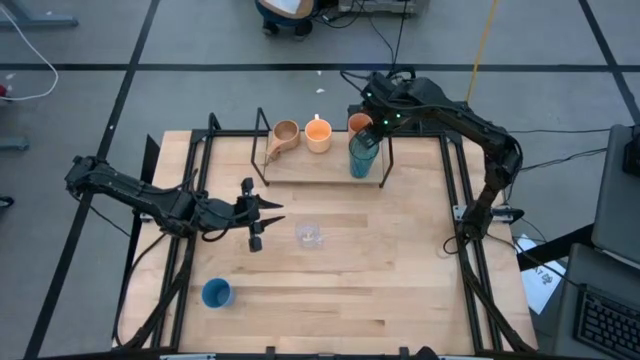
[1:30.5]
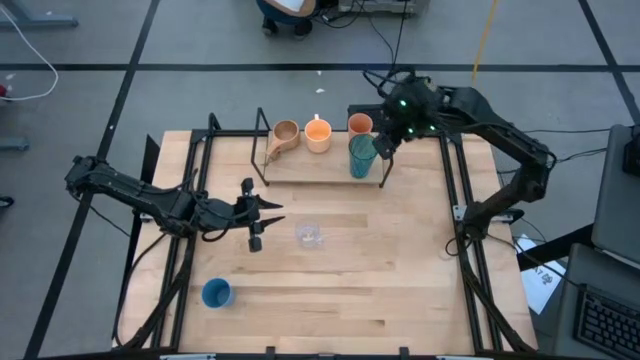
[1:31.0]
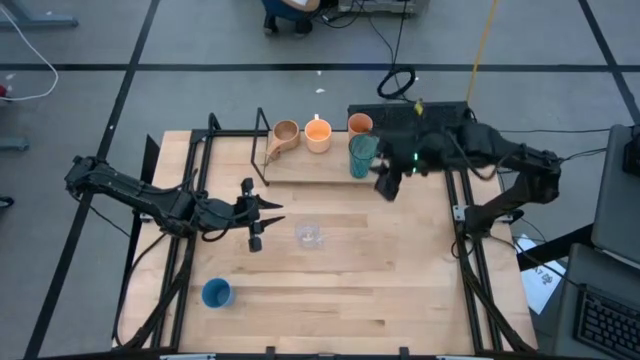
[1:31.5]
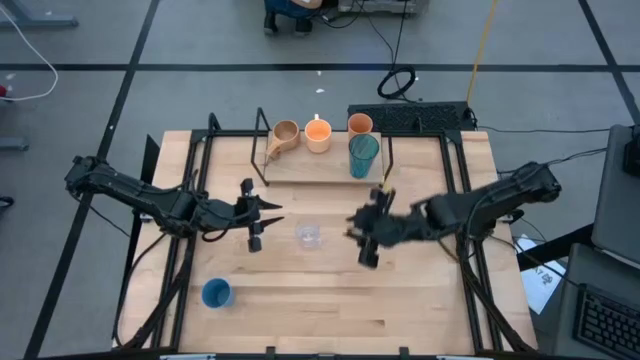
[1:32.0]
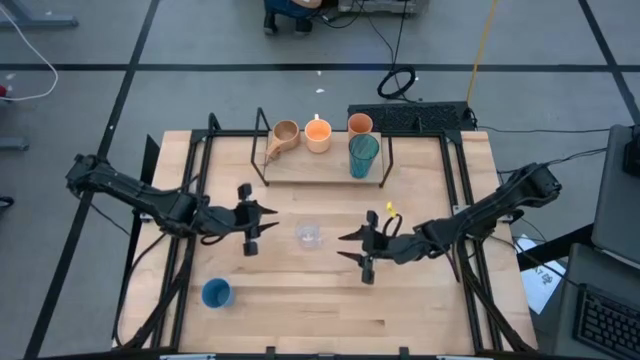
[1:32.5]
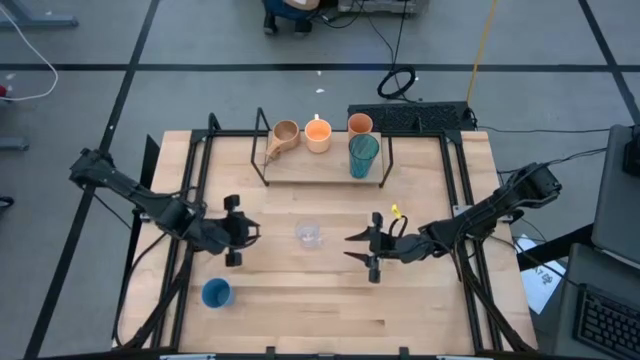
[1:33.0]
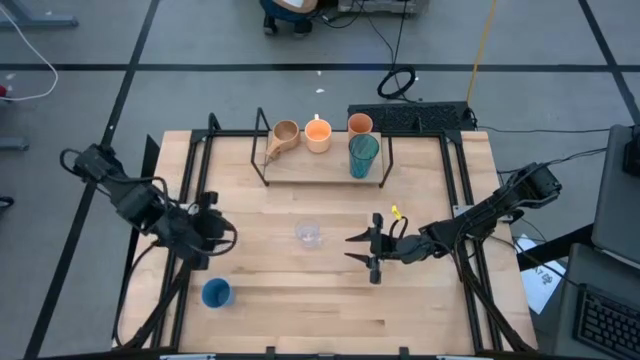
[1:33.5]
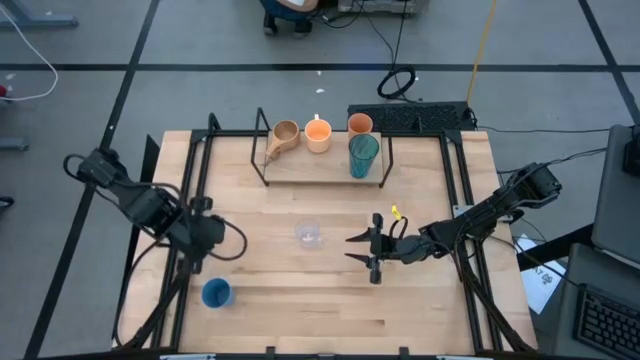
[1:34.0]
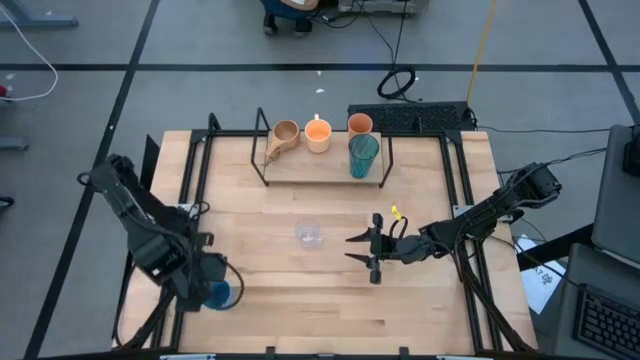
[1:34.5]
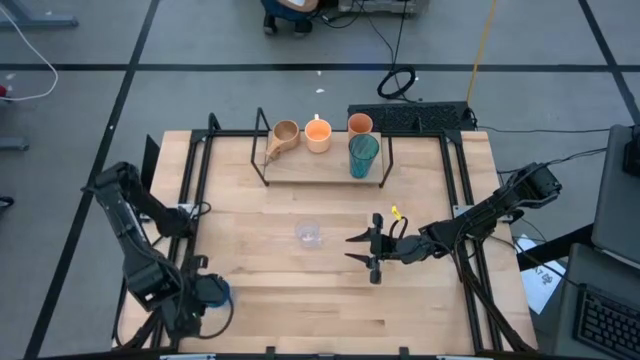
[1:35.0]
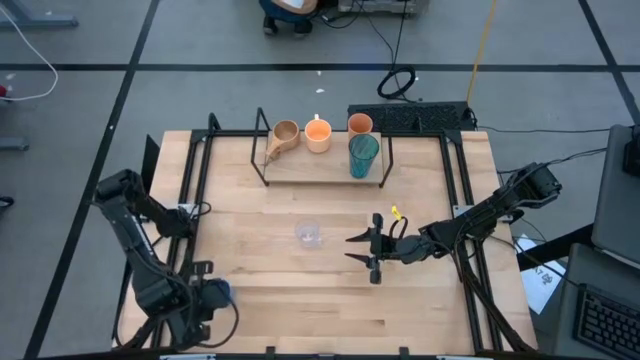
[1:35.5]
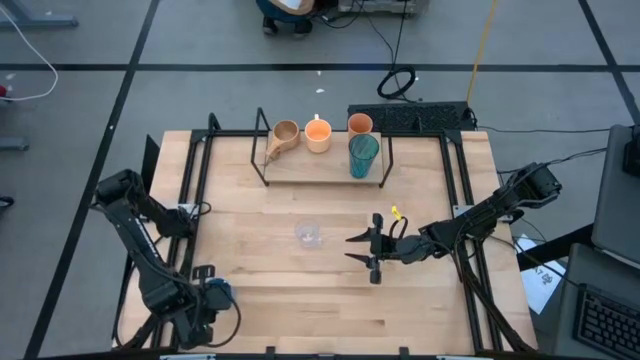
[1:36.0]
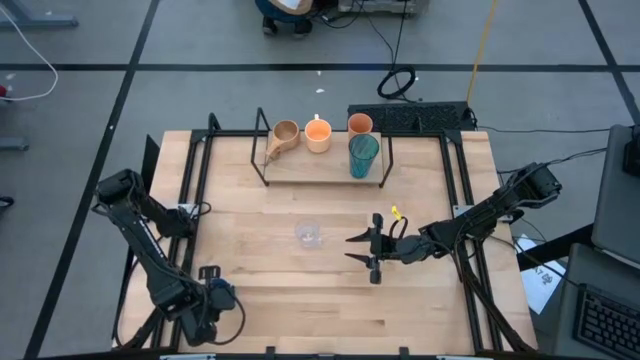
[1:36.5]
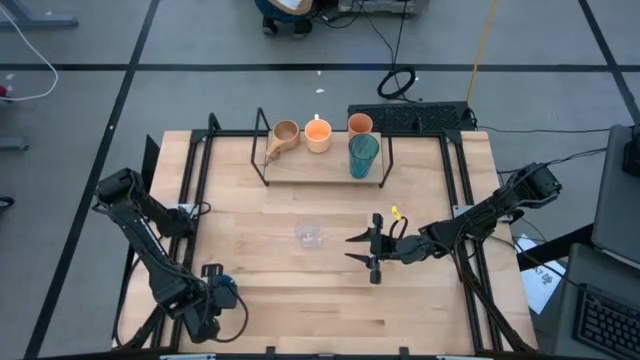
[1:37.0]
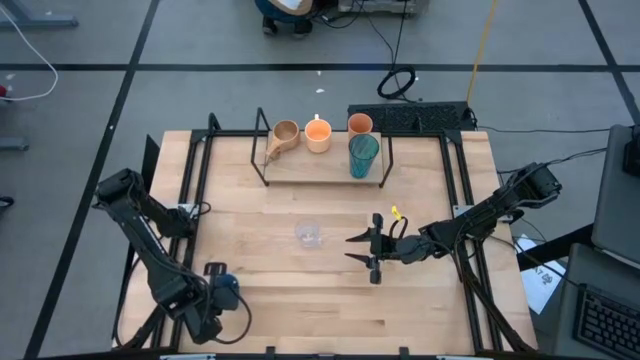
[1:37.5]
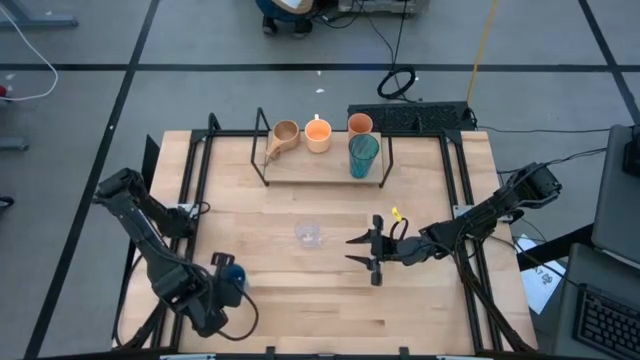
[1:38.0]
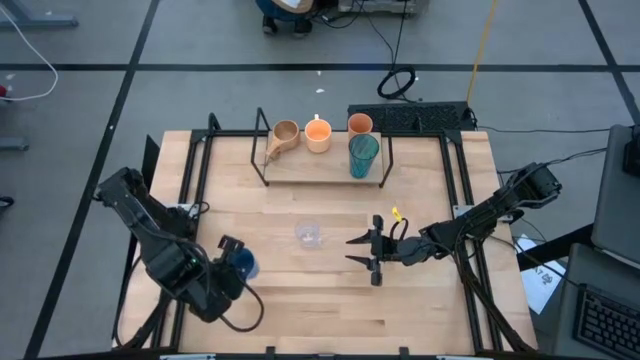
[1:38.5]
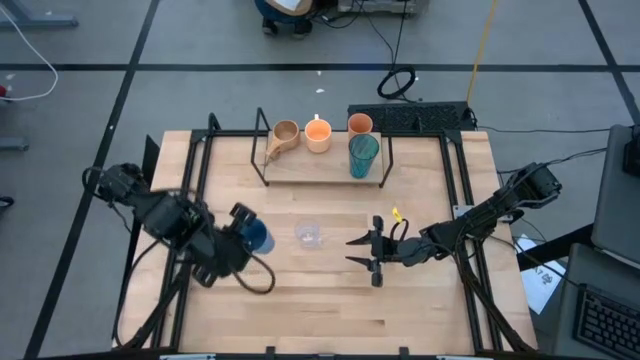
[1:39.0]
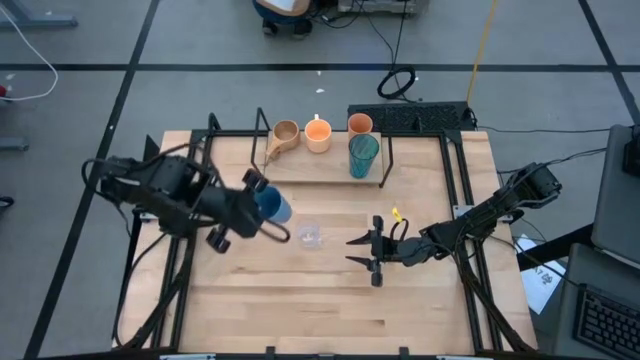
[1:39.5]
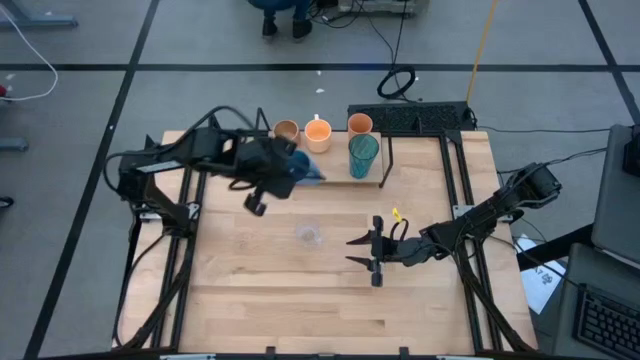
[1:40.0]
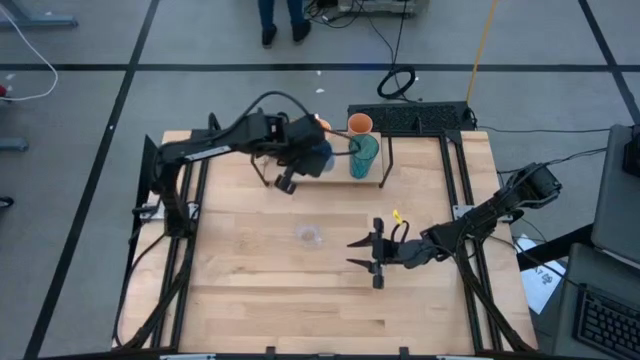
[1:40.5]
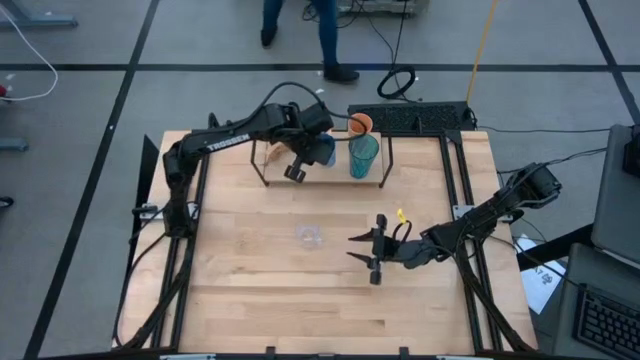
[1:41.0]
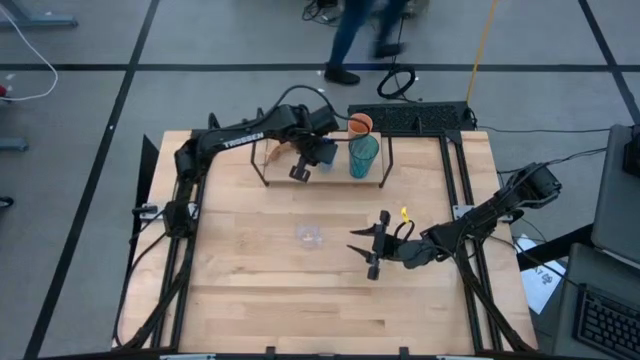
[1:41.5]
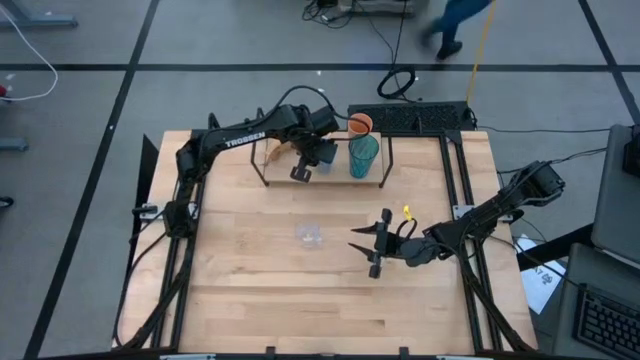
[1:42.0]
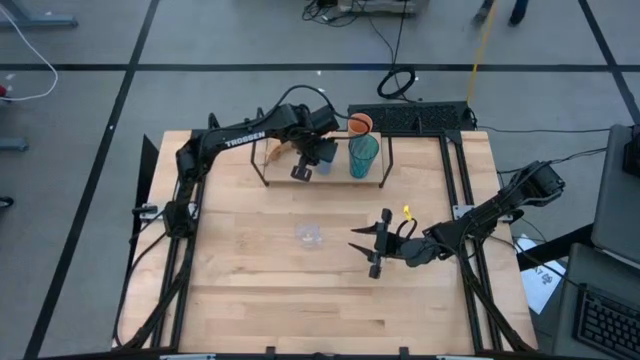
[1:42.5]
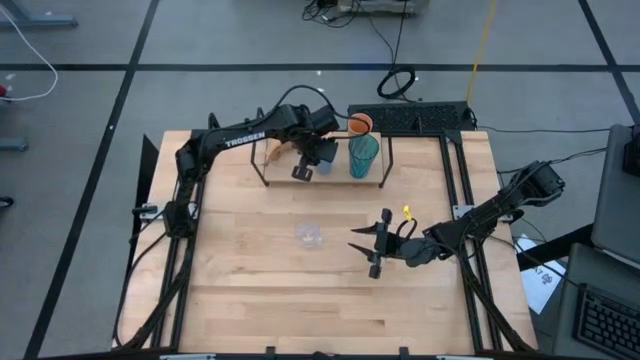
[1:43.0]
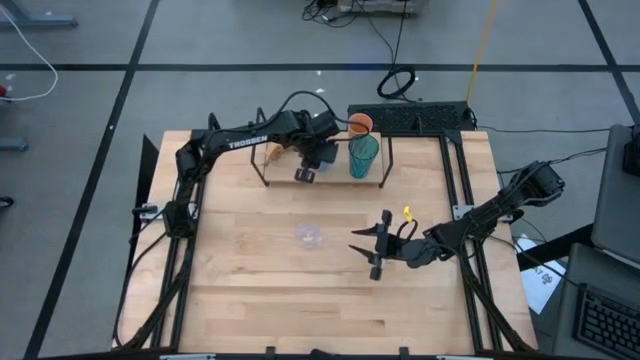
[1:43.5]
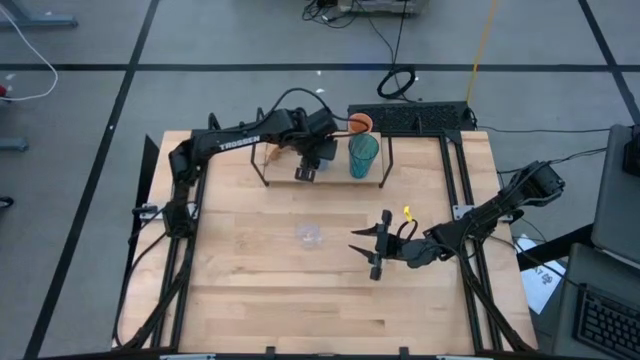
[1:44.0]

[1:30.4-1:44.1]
Task: Stack small to large cups/mugs on shelf
Put the blue cup on the shelf

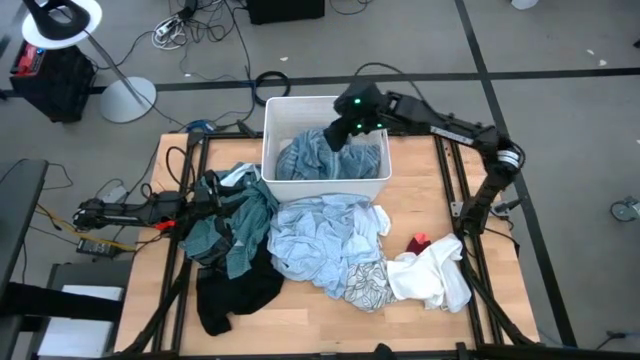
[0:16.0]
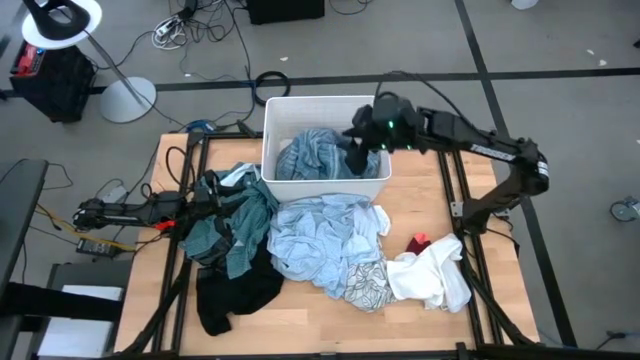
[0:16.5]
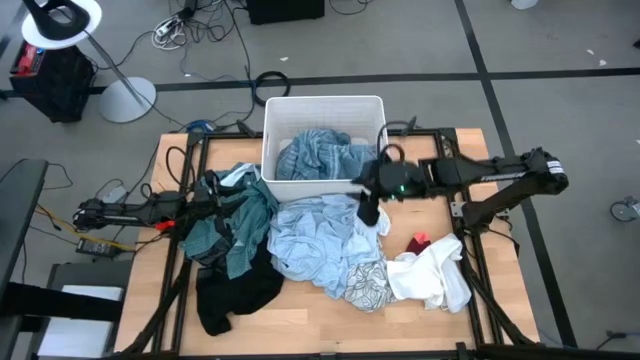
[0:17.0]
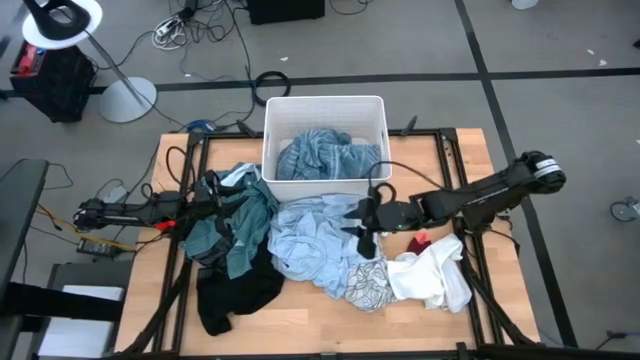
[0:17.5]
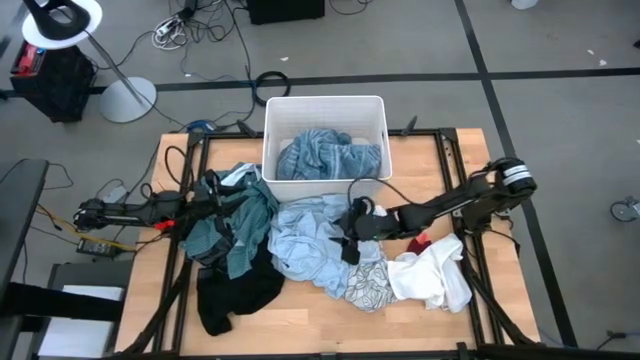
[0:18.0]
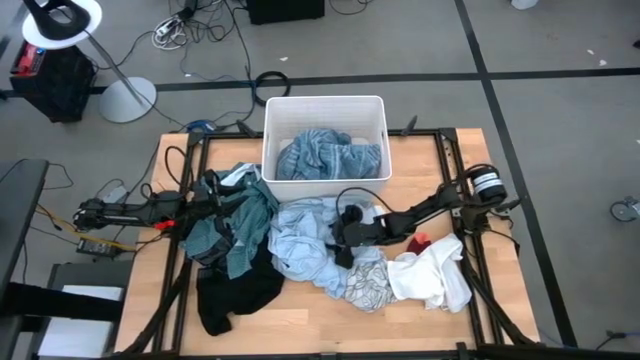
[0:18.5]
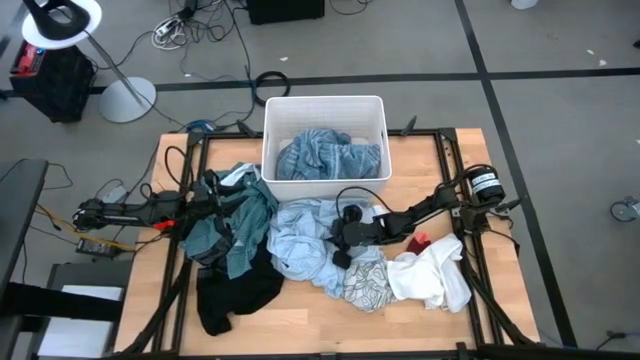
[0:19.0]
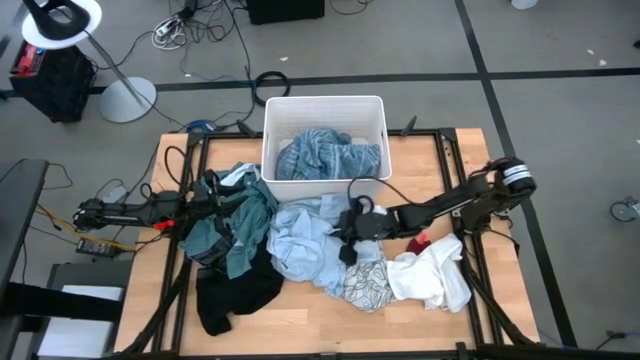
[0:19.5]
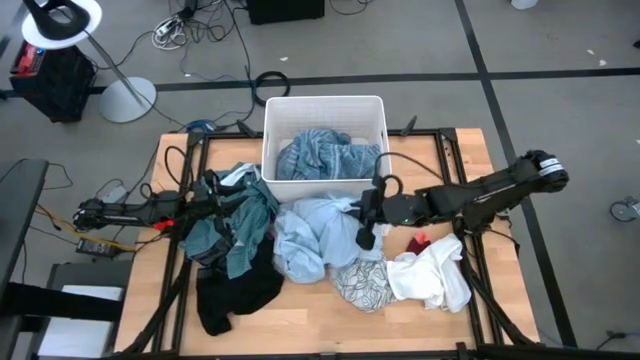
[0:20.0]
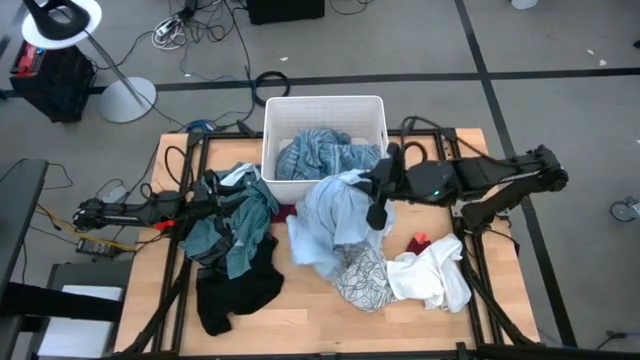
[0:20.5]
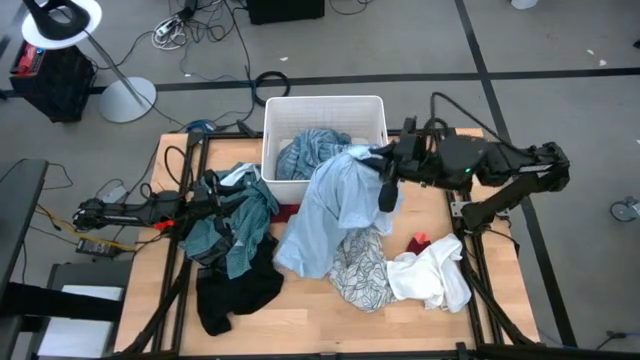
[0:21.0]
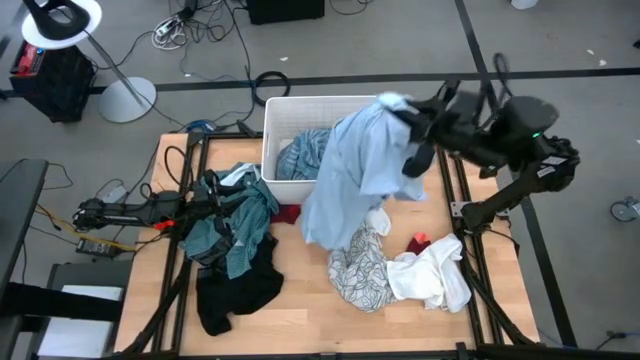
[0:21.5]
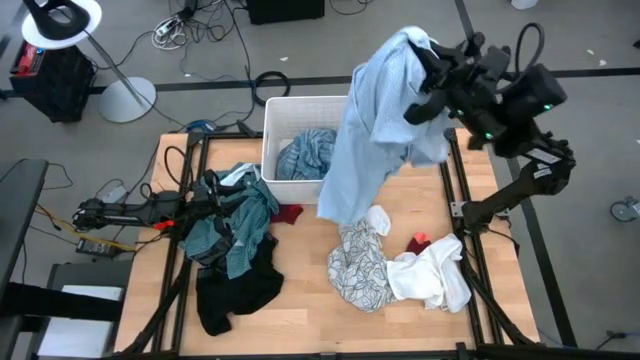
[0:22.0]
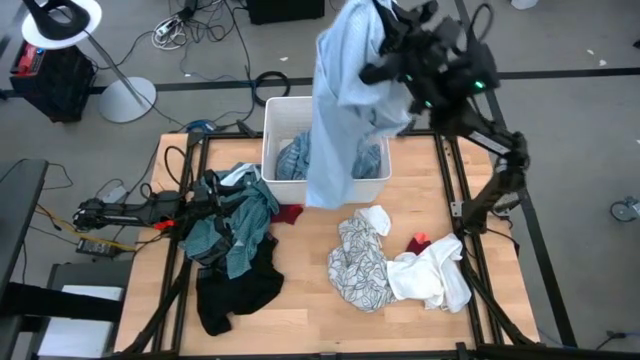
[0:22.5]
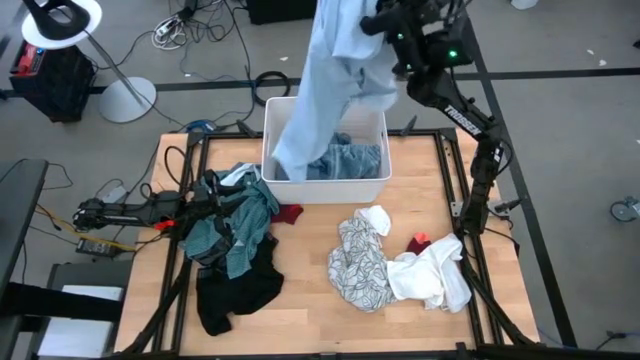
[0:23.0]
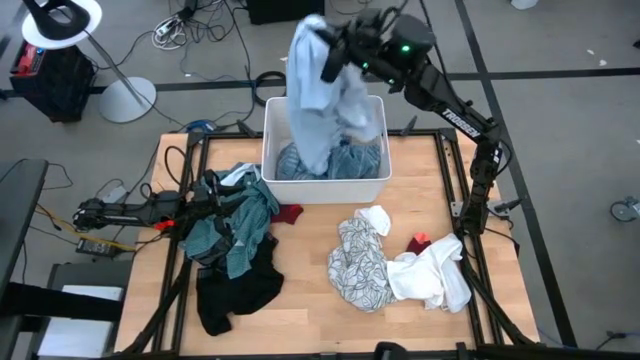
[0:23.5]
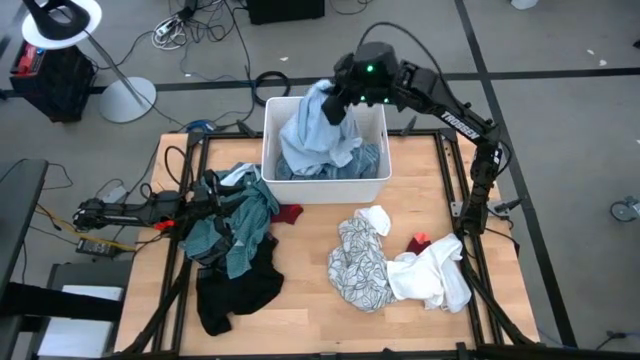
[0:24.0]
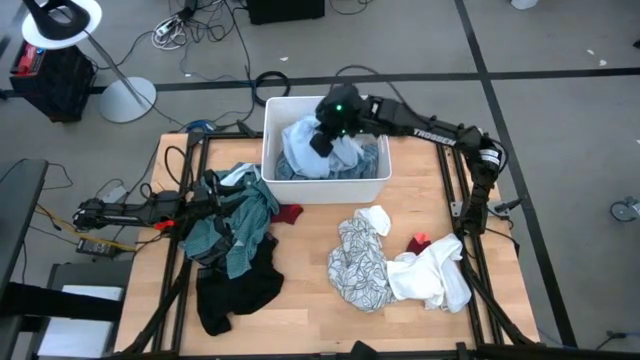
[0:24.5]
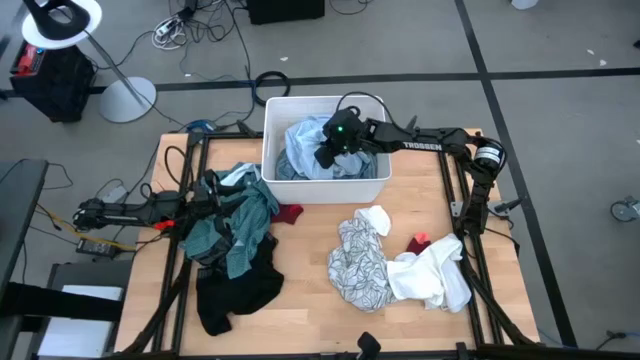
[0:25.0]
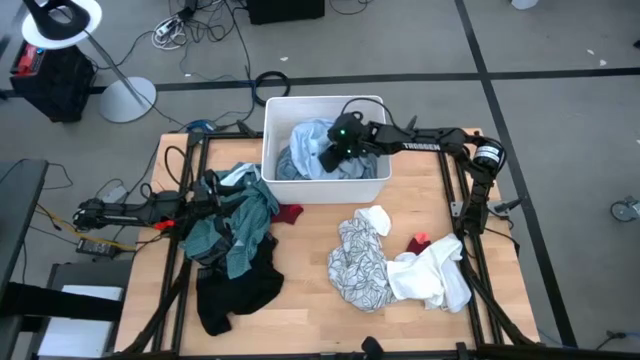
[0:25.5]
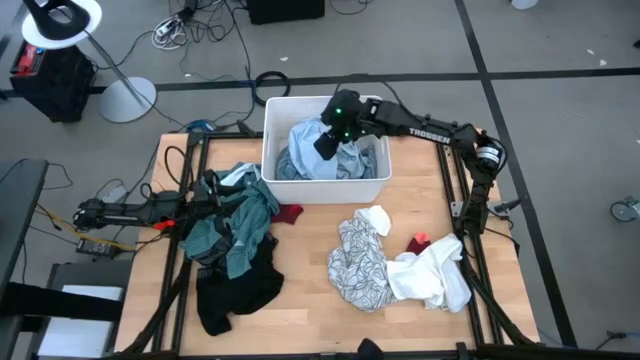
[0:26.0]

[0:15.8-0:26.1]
Task: Sort clothes
Put the light blue polo shirt into the white laundry bin
